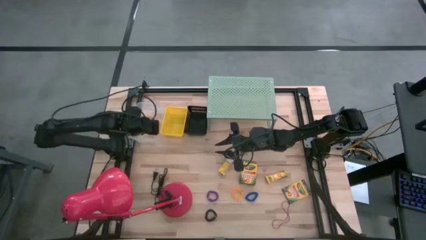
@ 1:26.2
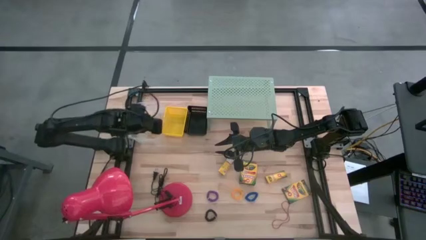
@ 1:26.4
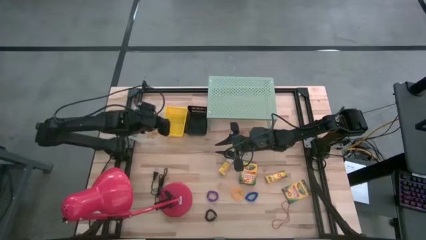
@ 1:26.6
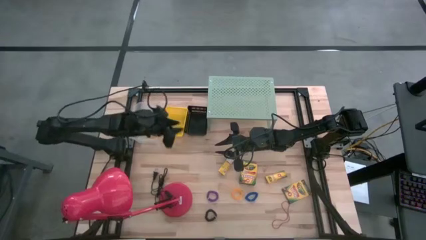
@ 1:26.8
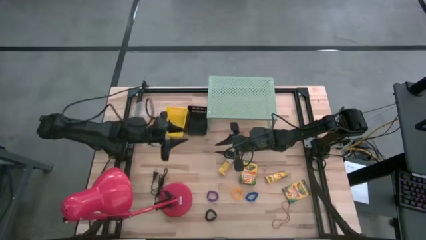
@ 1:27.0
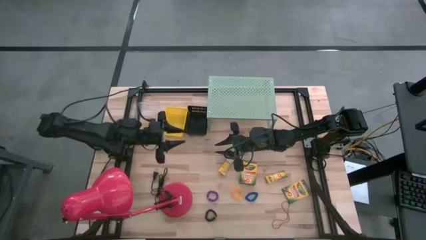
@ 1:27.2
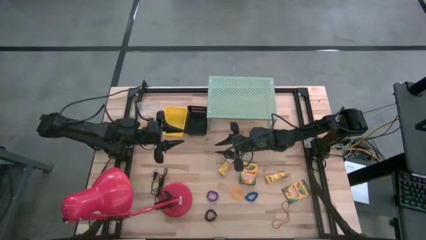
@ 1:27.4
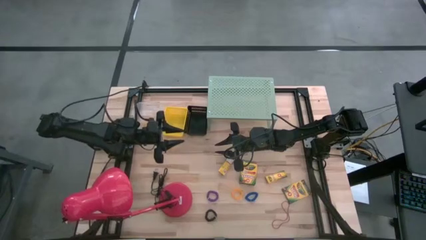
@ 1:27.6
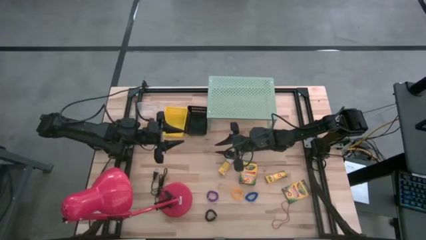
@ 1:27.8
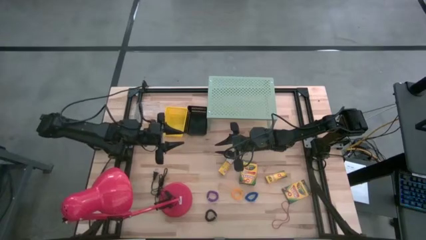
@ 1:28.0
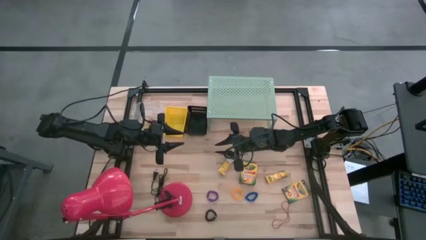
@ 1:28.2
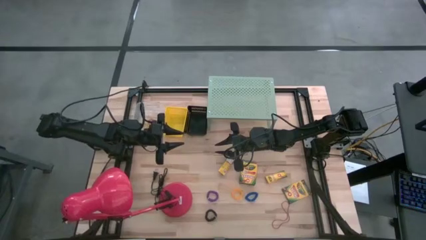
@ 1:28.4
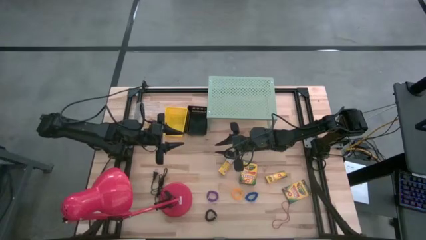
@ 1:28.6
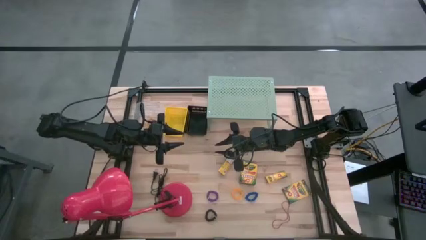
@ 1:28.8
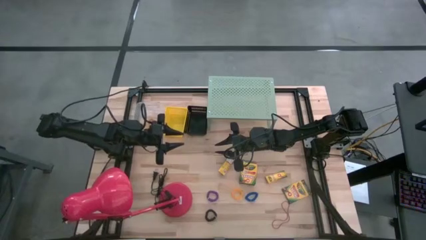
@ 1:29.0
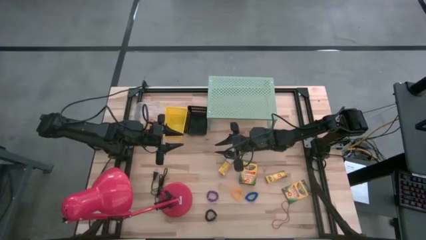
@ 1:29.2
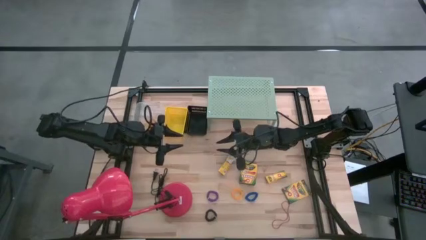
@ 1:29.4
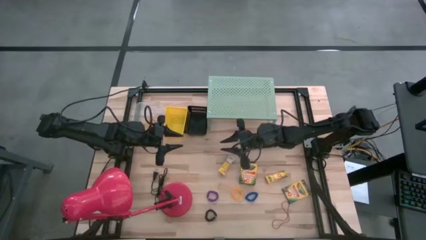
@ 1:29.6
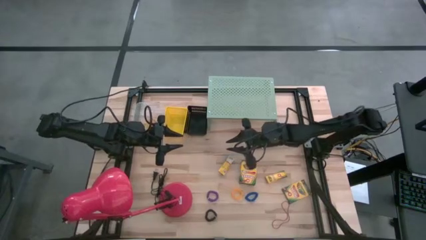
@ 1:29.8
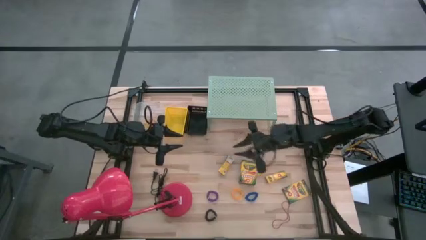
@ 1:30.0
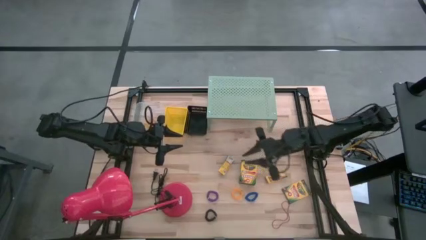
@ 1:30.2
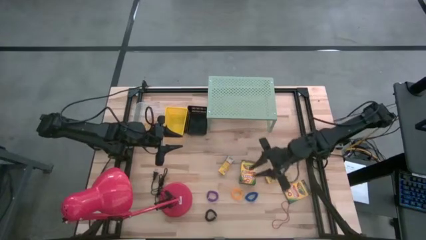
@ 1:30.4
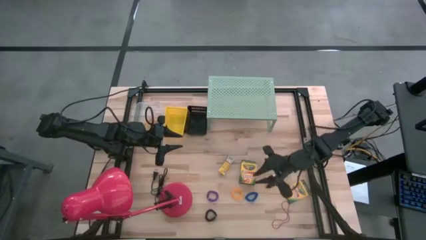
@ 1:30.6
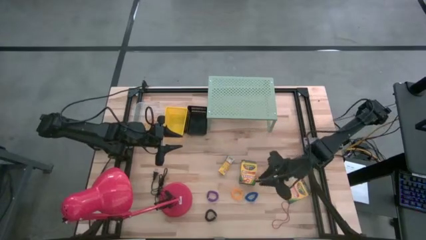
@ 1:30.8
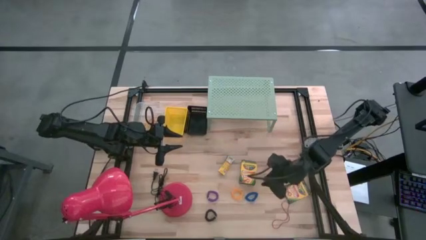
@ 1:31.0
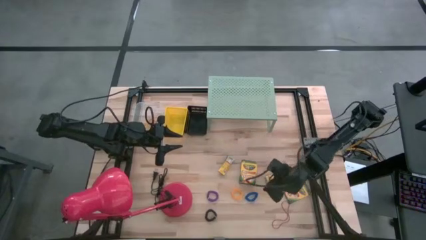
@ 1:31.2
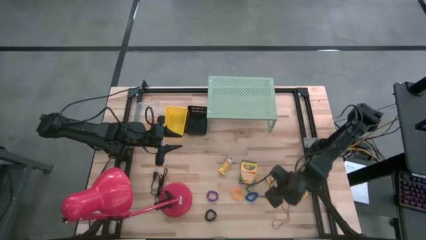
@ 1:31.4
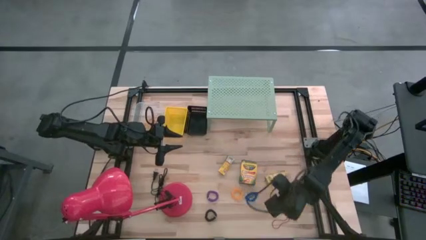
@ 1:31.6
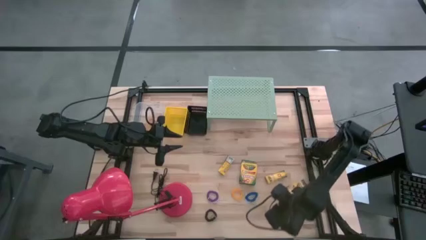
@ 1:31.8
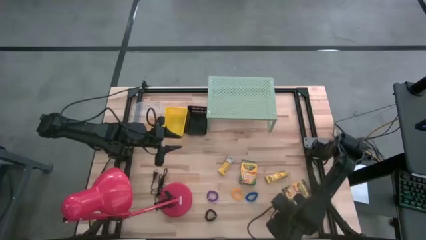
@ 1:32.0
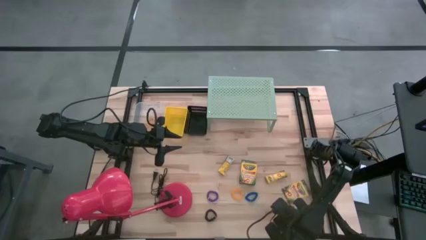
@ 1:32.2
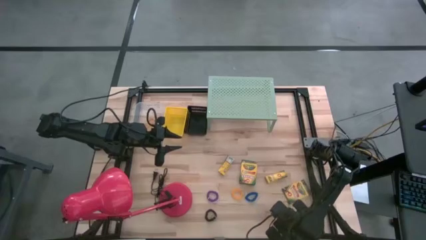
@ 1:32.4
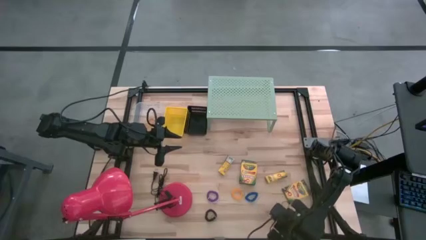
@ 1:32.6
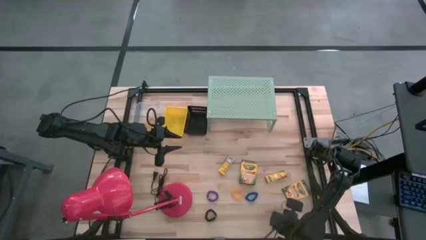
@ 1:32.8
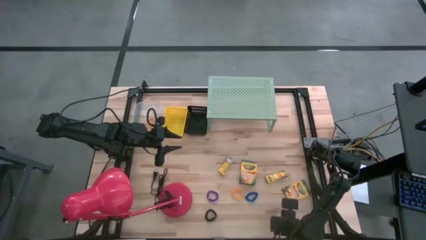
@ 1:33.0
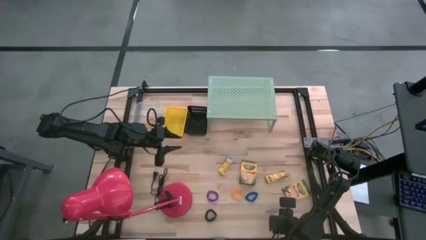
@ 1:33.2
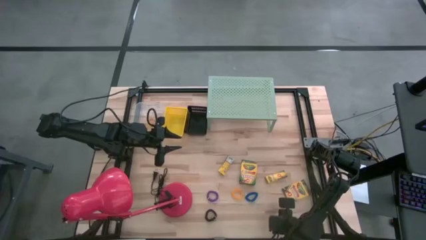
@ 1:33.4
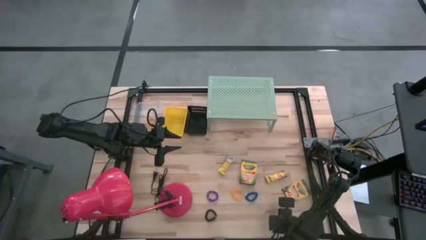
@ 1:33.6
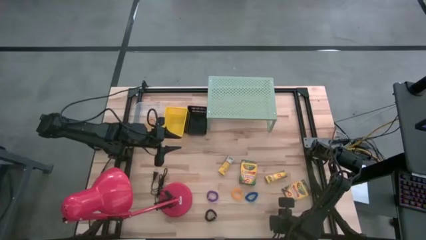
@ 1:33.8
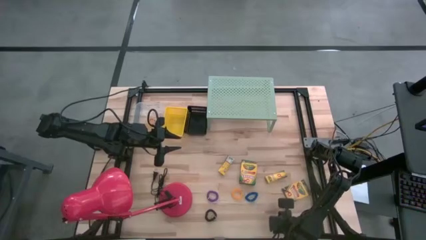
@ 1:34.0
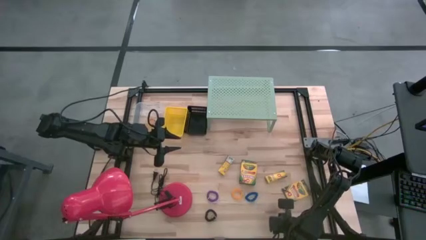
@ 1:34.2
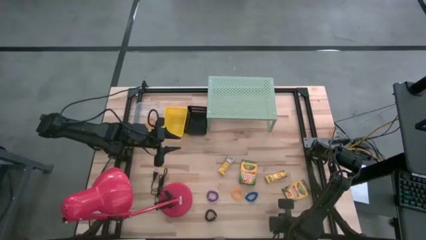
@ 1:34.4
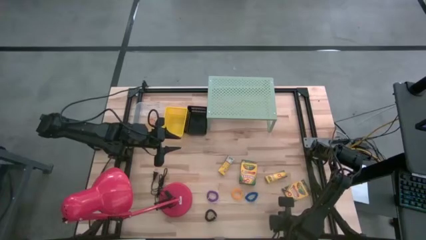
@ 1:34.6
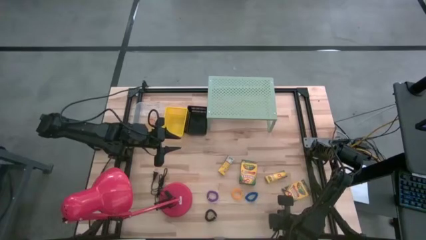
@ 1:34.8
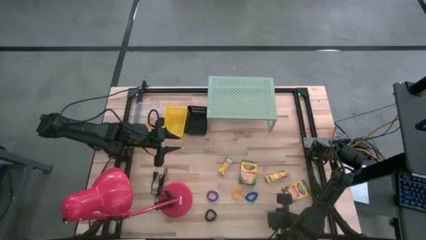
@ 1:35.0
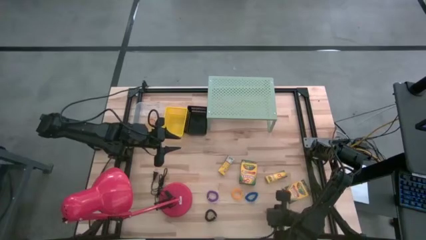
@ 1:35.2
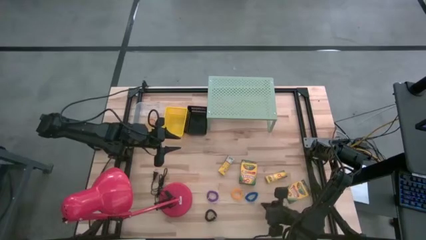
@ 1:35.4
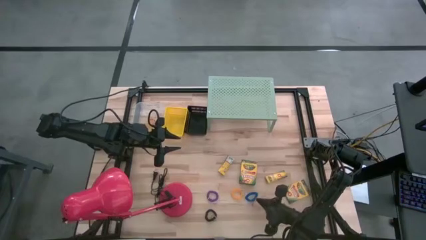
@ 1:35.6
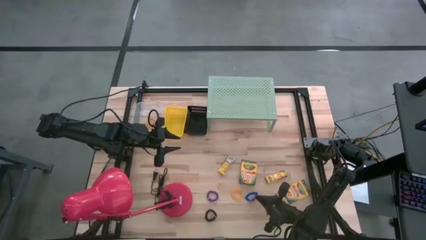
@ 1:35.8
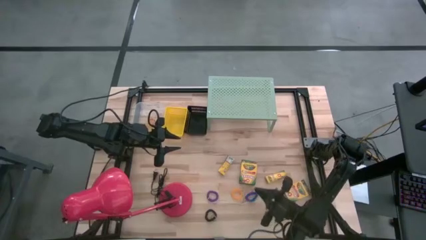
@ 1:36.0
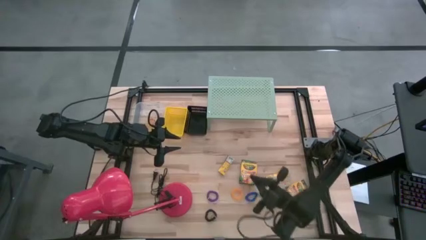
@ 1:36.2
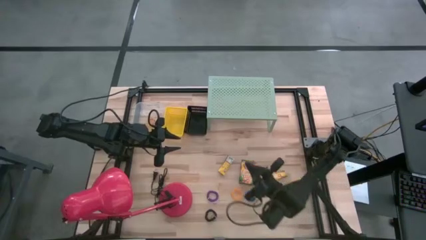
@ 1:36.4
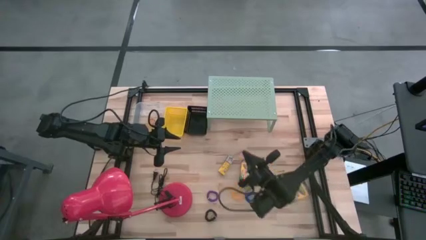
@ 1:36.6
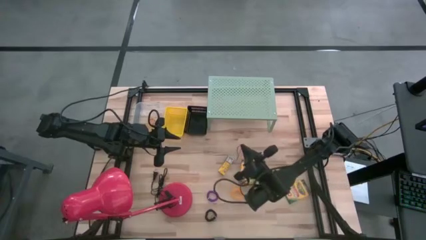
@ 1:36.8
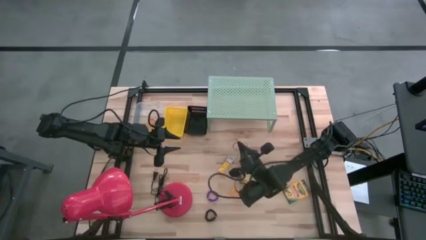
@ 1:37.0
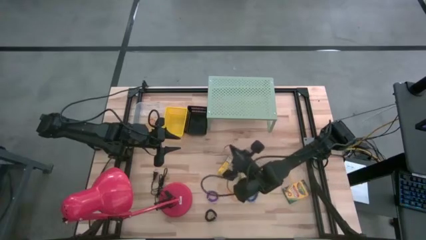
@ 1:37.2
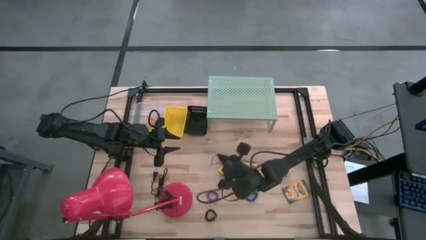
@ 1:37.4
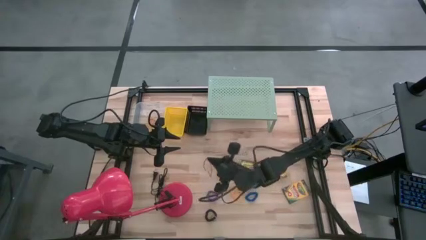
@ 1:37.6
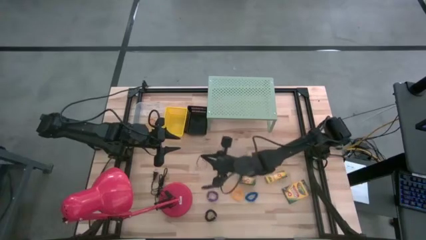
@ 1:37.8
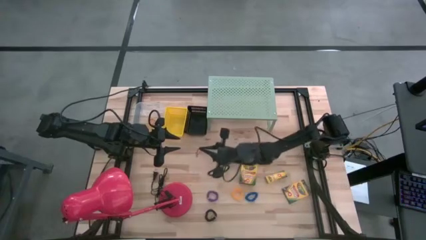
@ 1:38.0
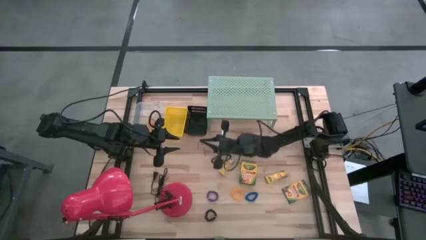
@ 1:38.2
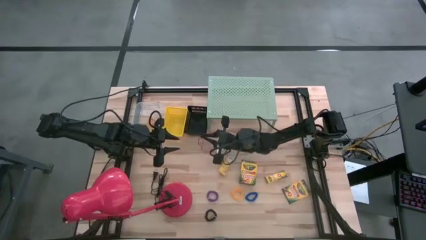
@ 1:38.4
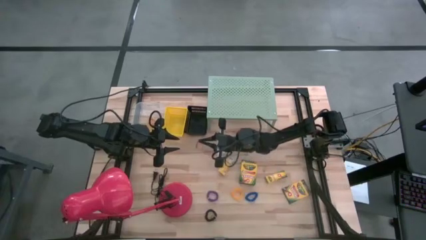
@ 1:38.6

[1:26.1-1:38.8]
Task: Pick & Place Office Desk Supplies
Put the red rubber band into the transparent bin

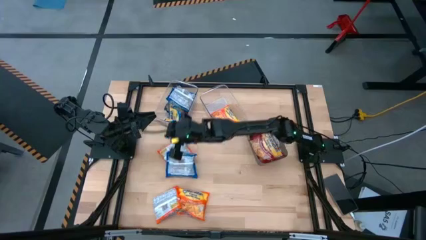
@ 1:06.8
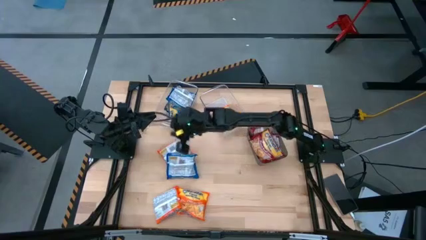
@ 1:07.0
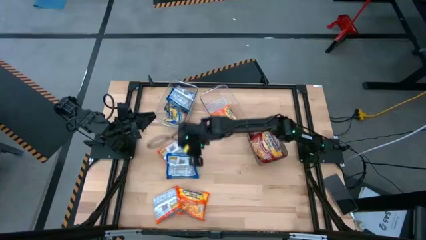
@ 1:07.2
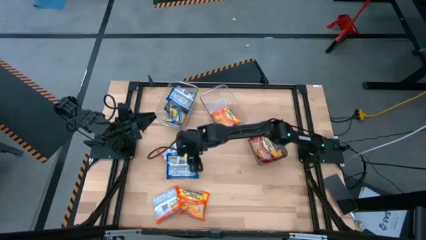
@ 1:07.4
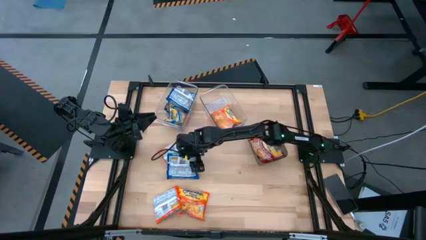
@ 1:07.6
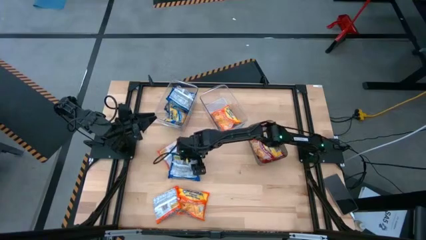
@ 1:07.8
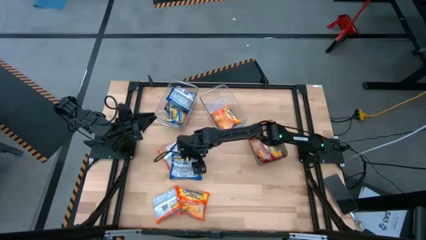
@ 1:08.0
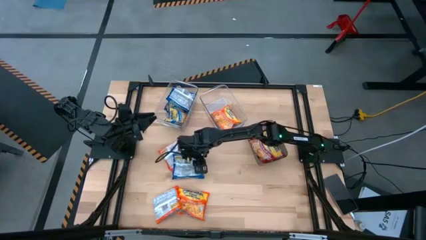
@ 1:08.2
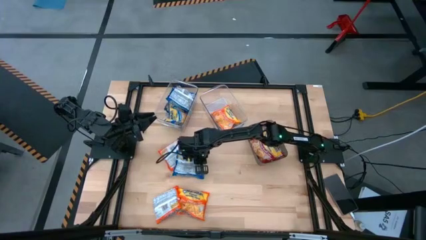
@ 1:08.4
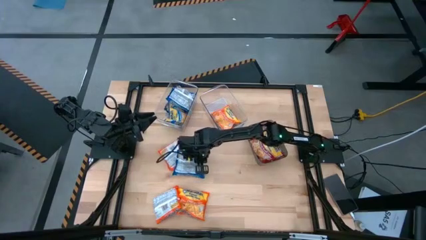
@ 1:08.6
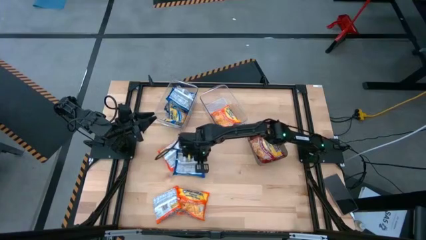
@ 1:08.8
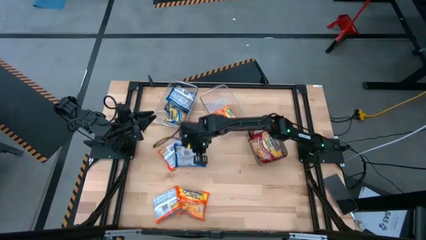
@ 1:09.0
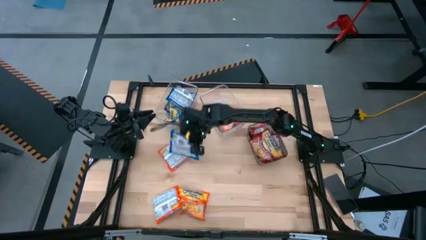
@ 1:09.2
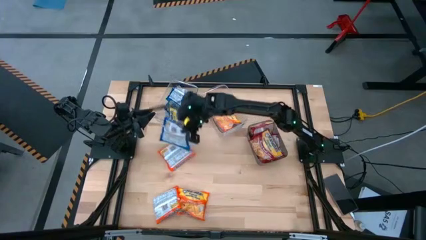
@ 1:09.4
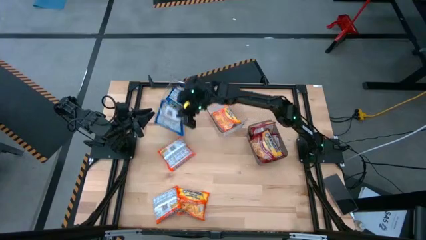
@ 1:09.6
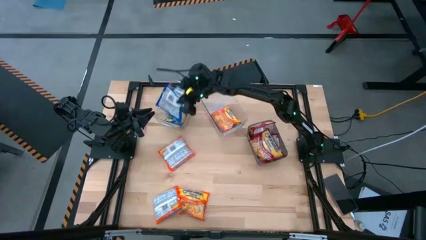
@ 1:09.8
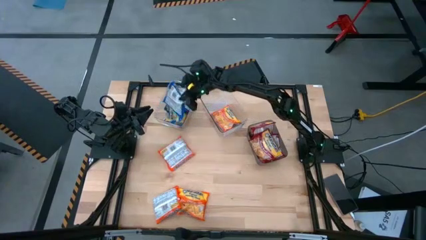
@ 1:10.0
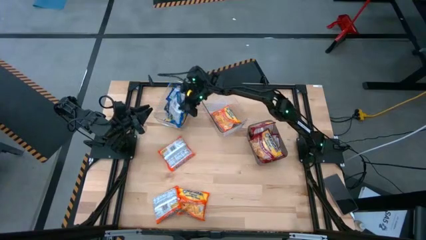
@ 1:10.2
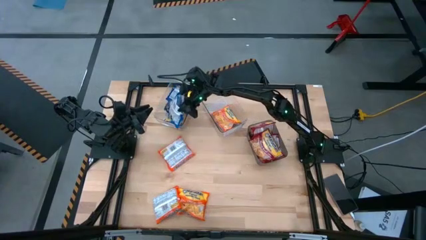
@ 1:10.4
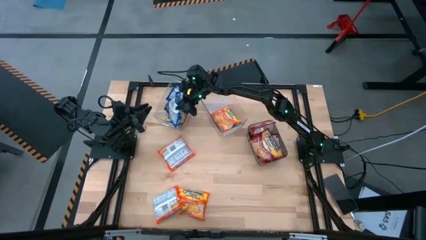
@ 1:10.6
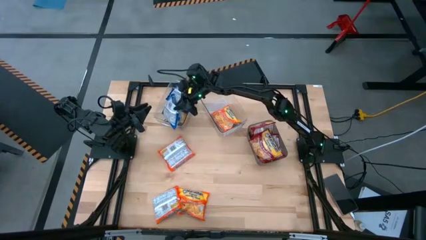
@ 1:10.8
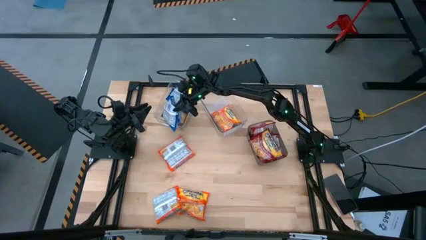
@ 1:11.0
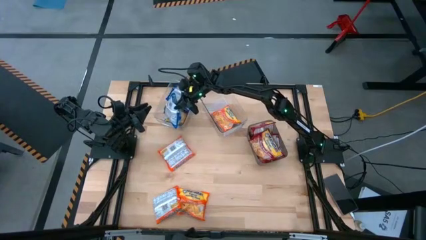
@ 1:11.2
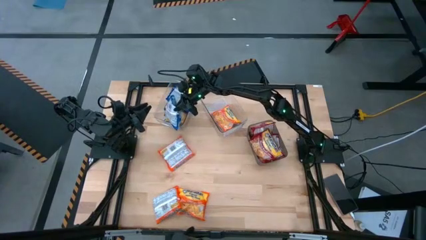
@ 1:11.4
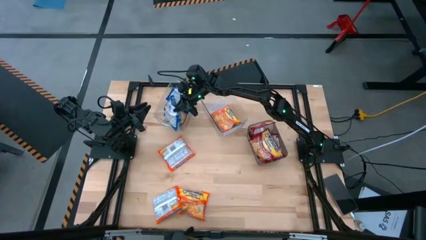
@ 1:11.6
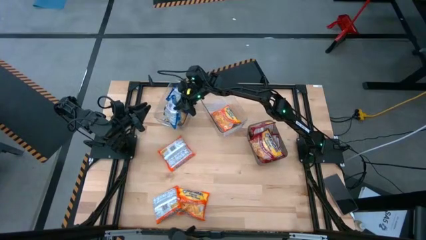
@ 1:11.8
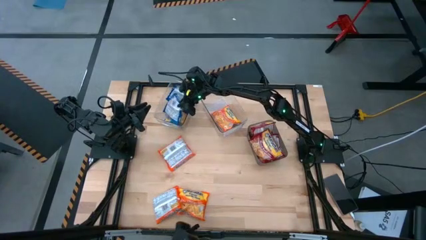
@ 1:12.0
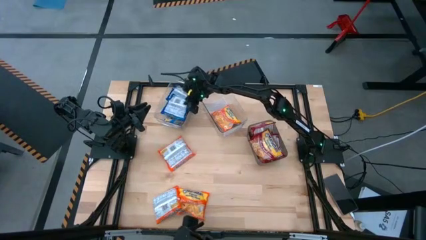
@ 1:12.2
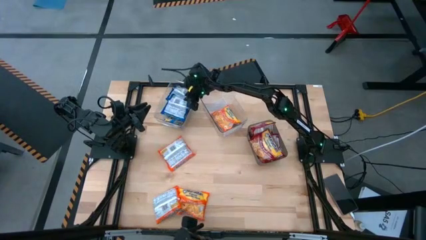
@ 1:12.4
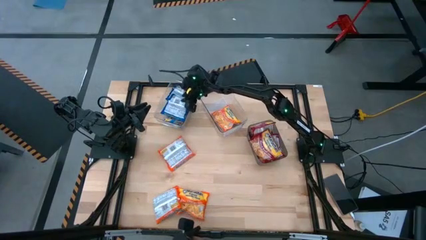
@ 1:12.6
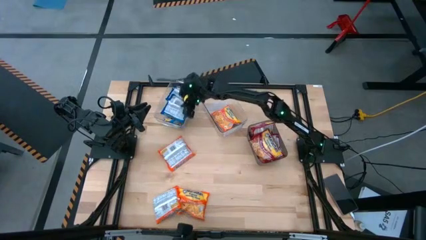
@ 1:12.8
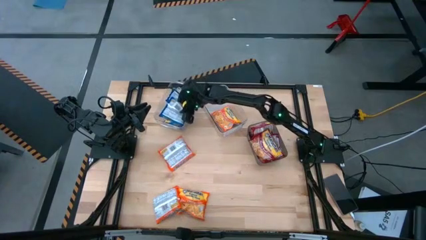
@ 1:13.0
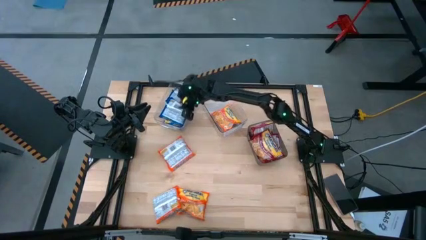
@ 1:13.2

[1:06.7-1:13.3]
Task: Sort Maruchan noodles
Put the blue noodle pack into the left transparent bin
